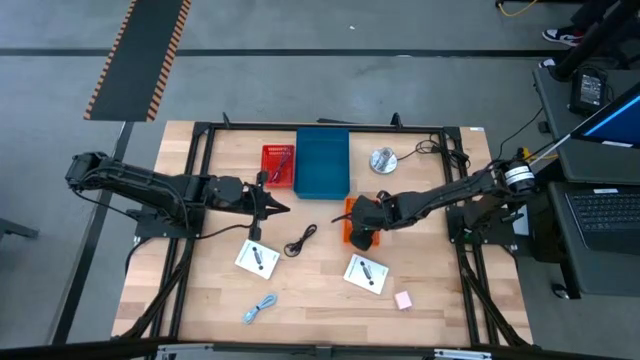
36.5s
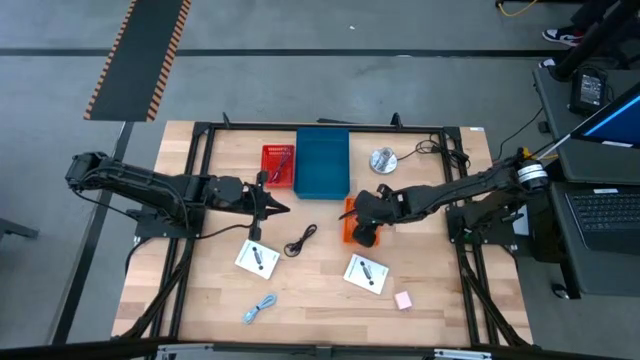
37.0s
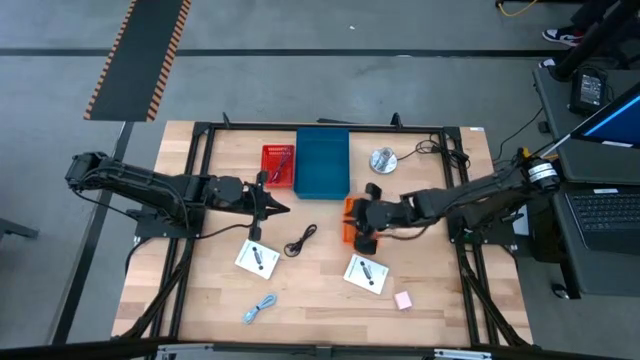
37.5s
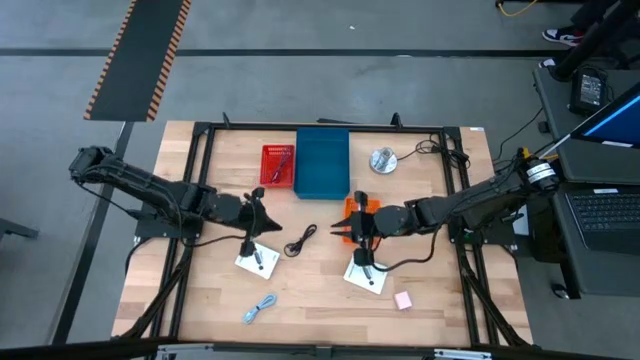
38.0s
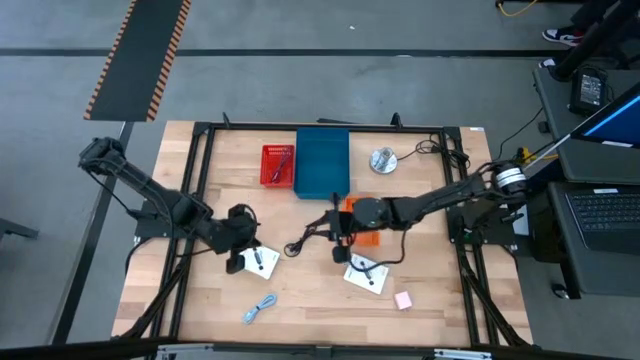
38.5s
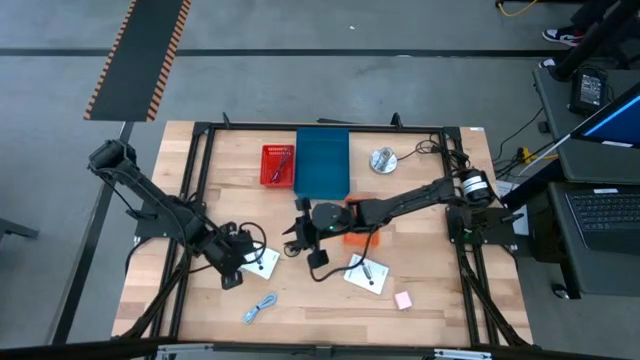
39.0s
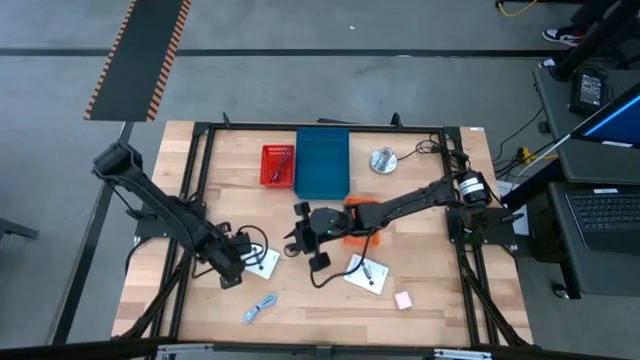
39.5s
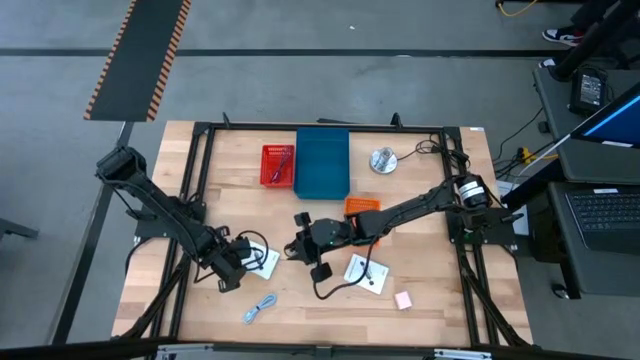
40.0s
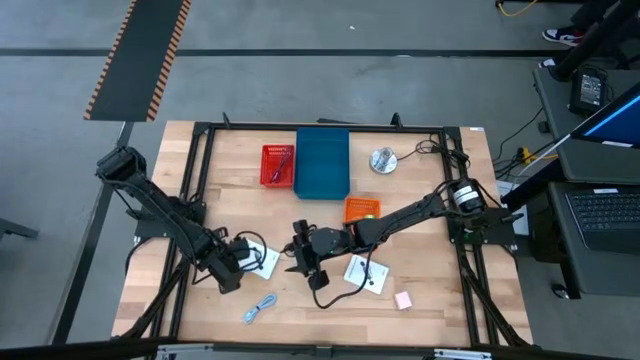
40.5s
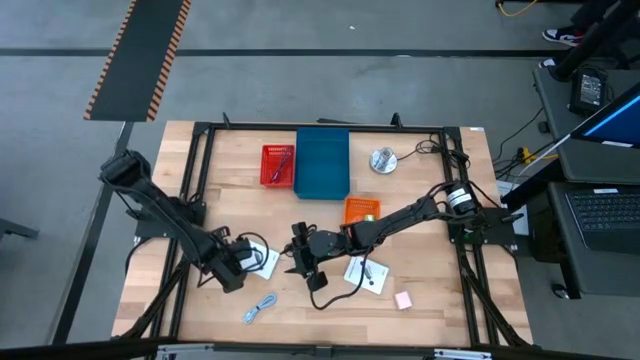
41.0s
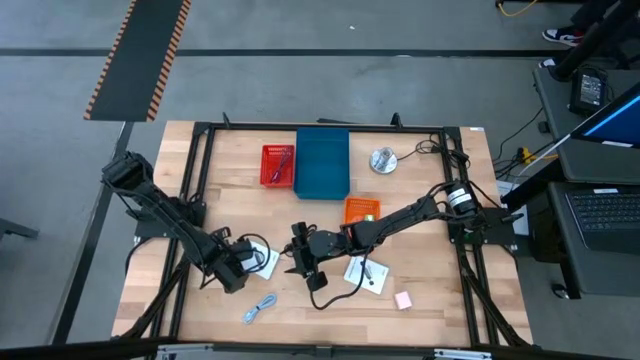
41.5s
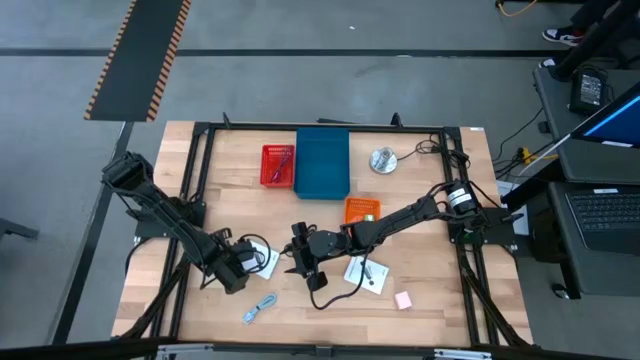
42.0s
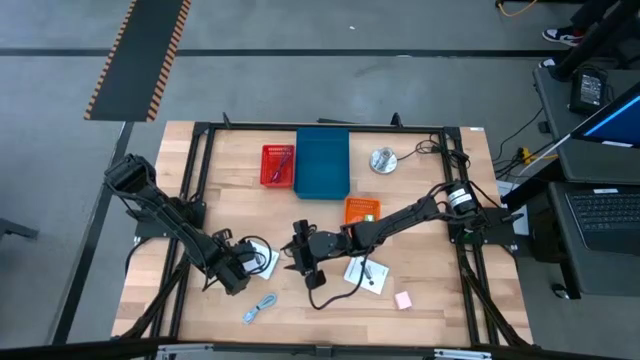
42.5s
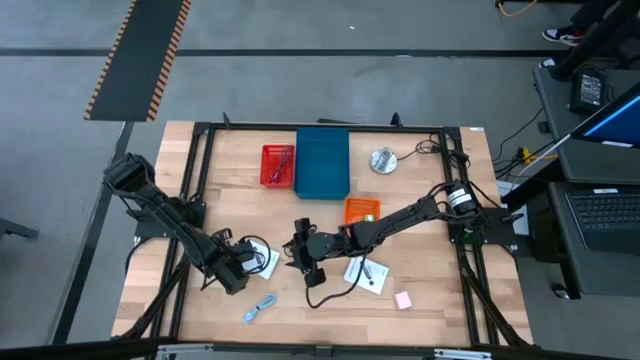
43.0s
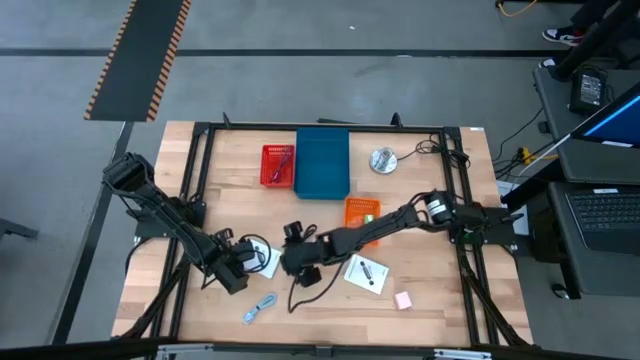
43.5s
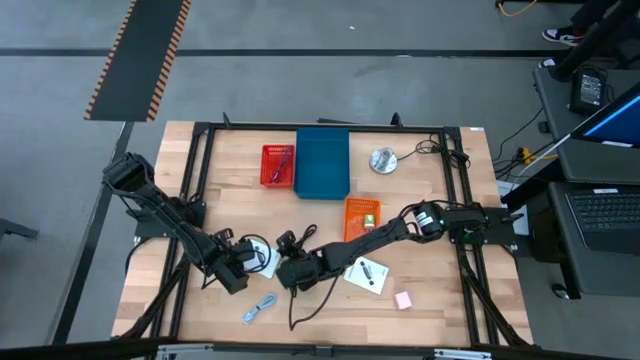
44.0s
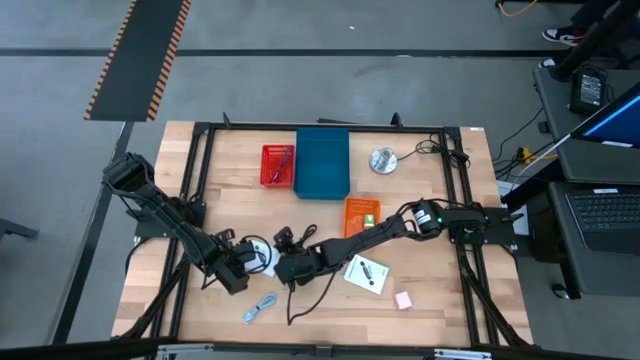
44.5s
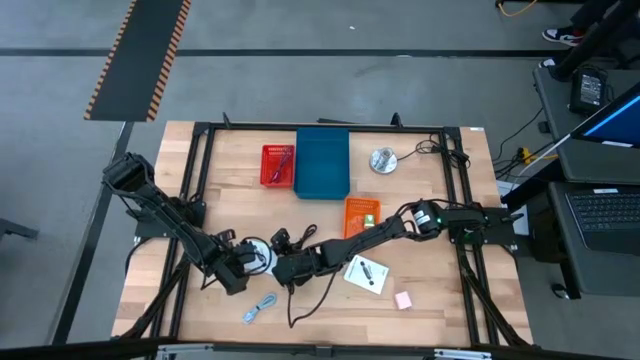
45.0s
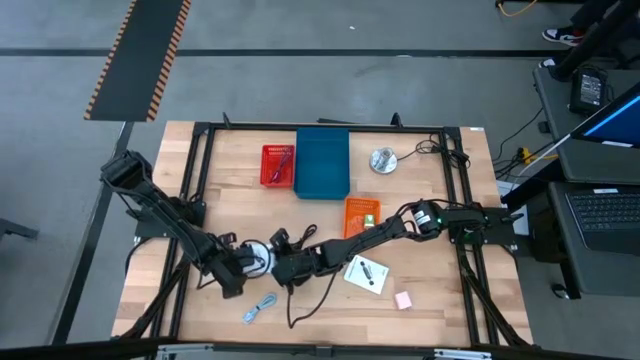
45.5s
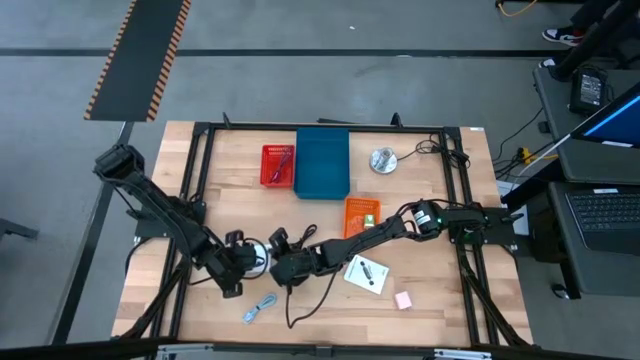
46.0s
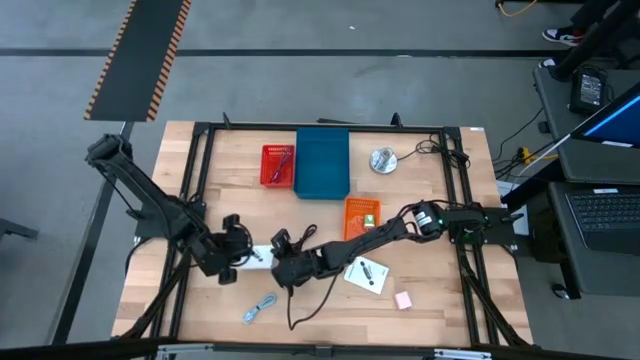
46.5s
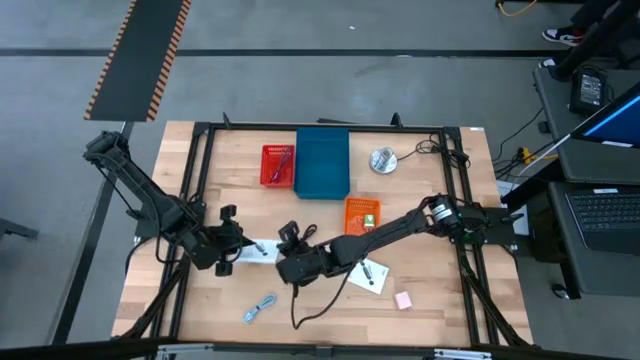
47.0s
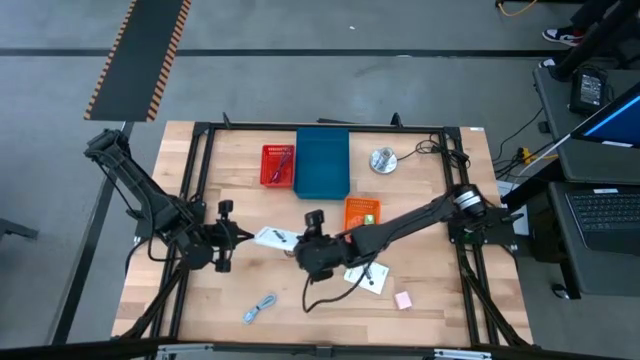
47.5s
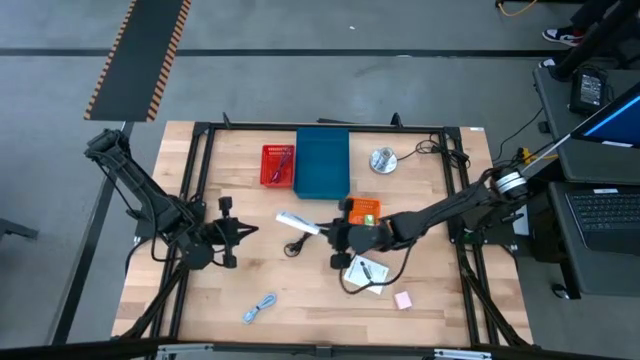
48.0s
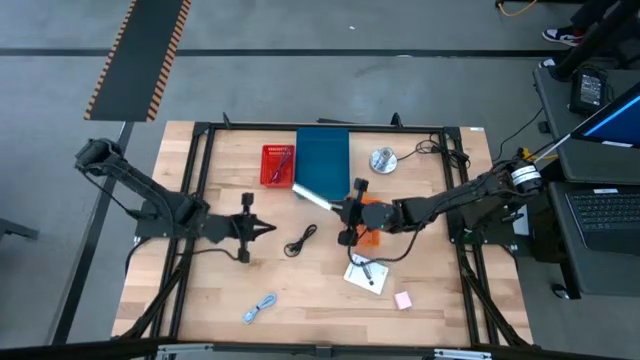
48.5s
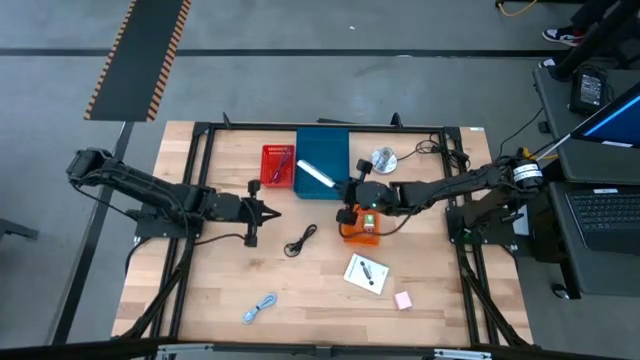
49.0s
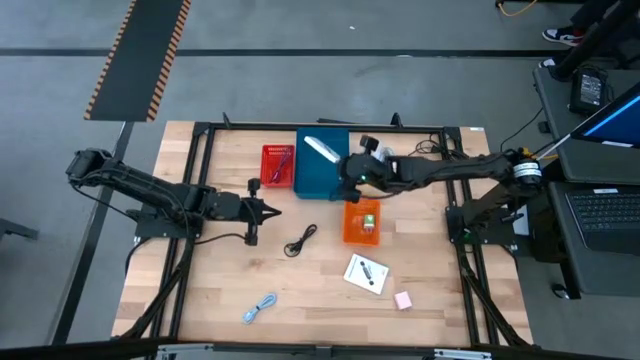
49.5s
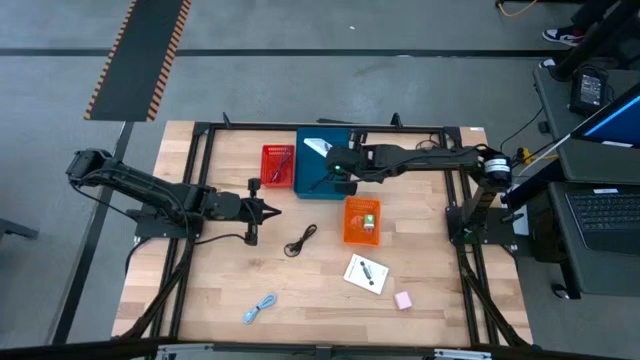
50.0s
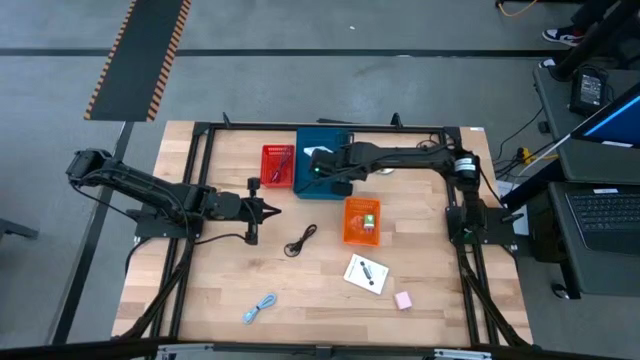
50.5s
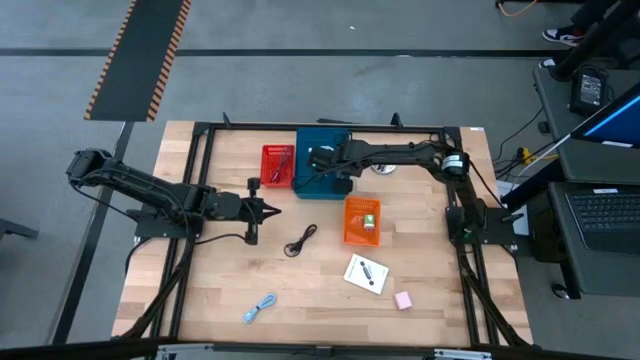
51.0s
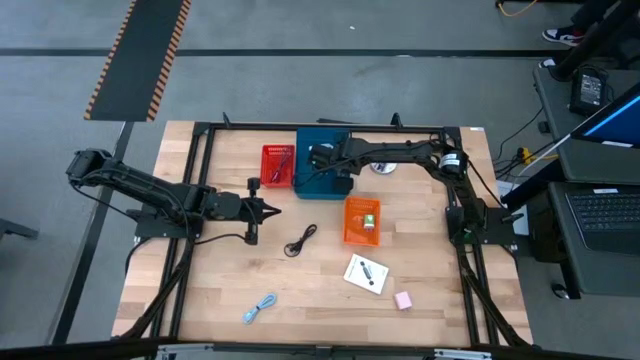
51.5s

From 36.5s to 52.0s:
Task: Pick and place items into bin
Put the left card reader box into the blue bin
